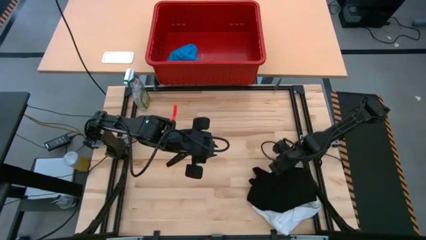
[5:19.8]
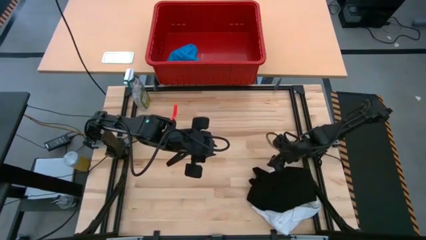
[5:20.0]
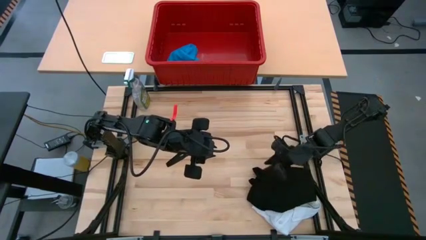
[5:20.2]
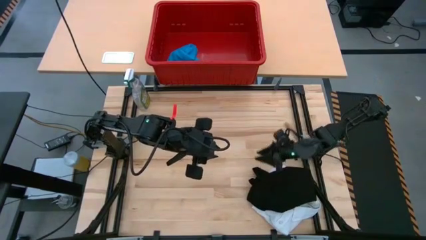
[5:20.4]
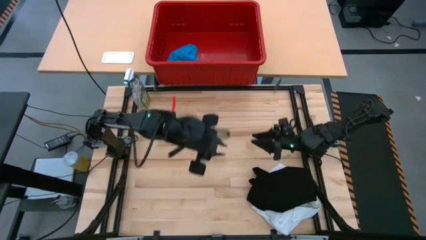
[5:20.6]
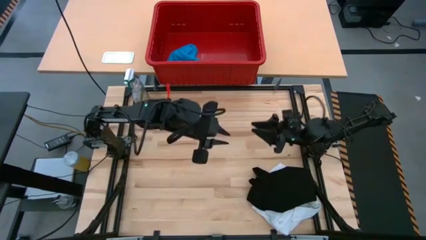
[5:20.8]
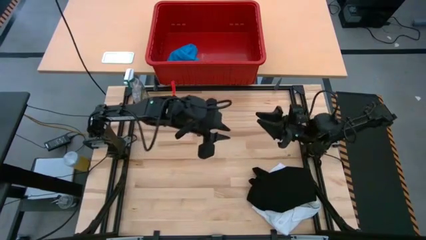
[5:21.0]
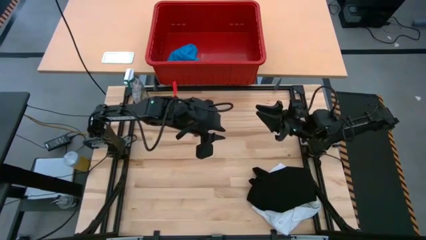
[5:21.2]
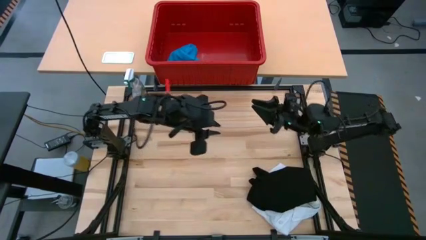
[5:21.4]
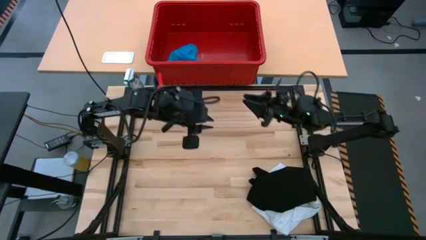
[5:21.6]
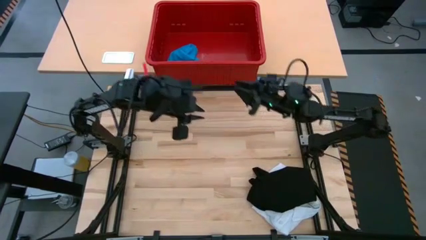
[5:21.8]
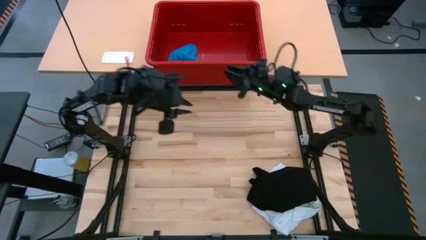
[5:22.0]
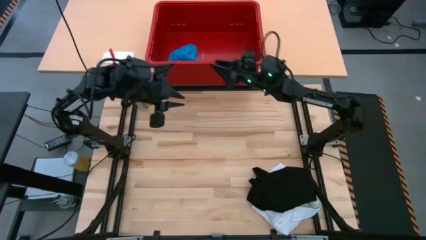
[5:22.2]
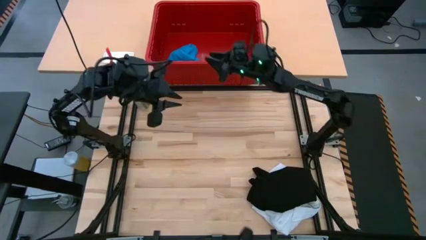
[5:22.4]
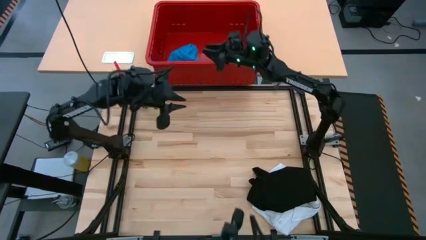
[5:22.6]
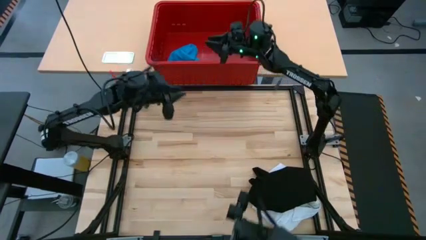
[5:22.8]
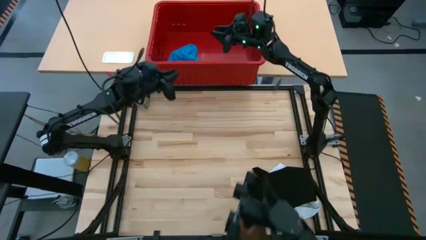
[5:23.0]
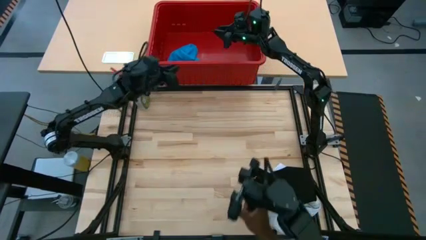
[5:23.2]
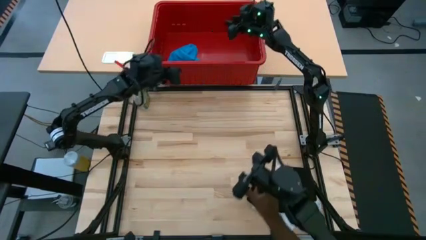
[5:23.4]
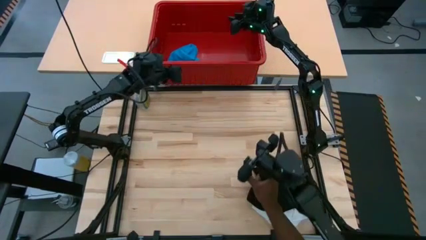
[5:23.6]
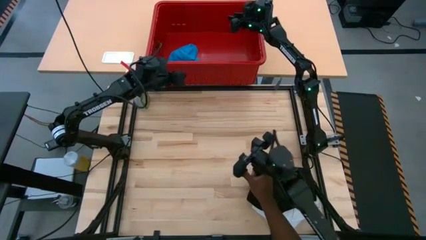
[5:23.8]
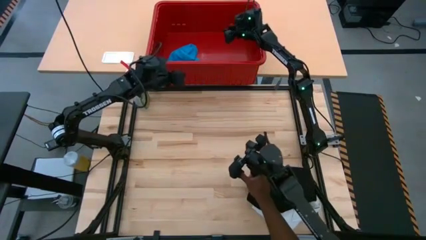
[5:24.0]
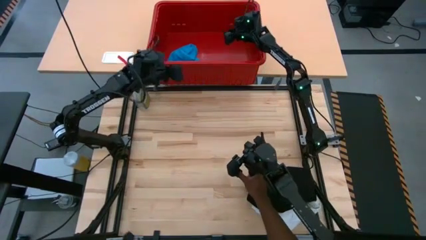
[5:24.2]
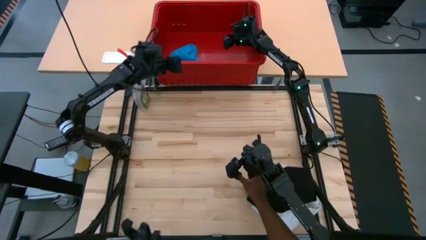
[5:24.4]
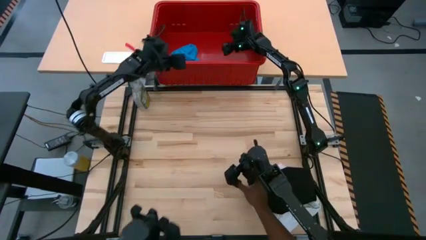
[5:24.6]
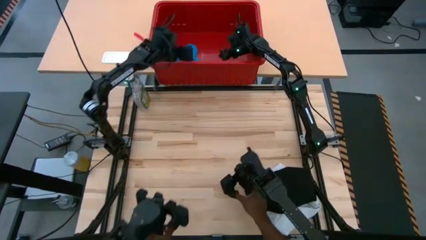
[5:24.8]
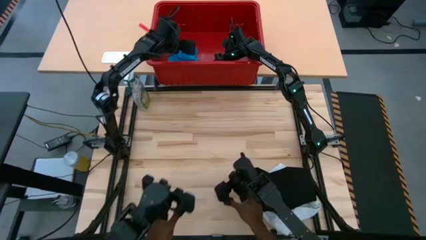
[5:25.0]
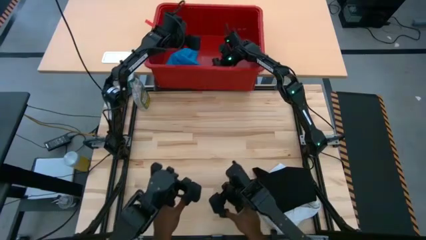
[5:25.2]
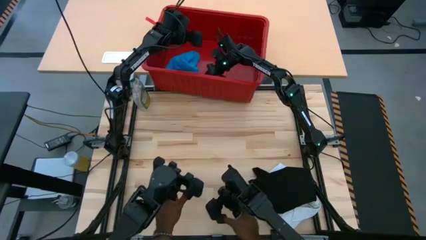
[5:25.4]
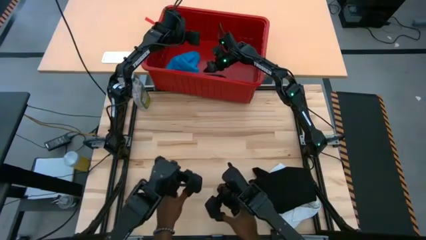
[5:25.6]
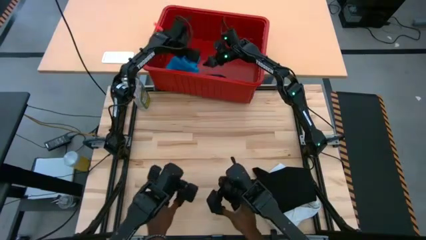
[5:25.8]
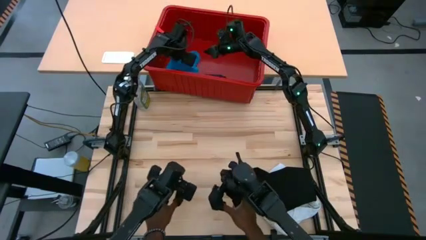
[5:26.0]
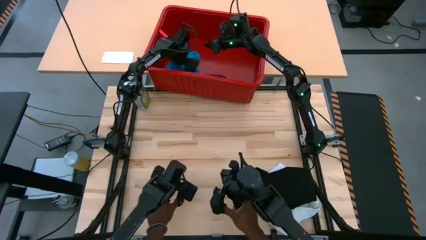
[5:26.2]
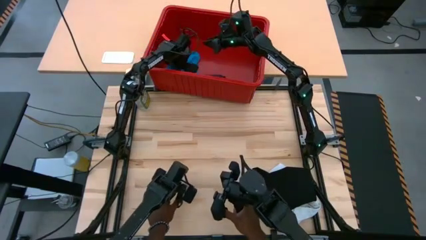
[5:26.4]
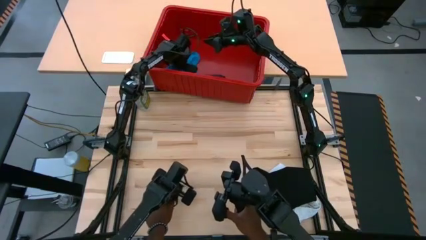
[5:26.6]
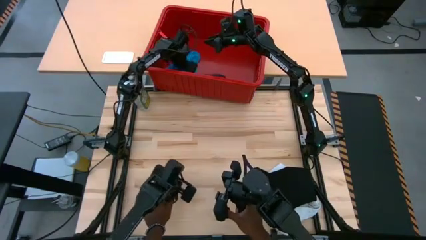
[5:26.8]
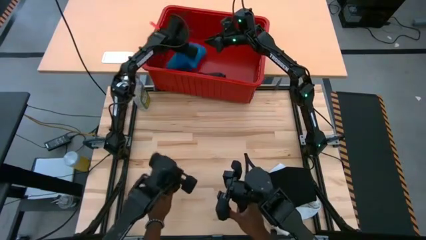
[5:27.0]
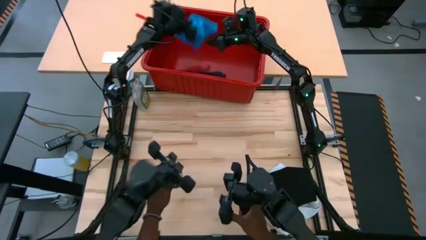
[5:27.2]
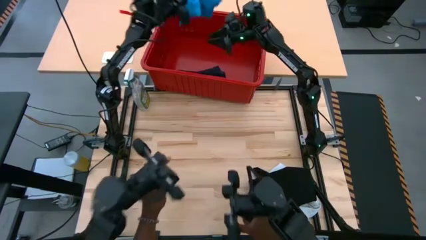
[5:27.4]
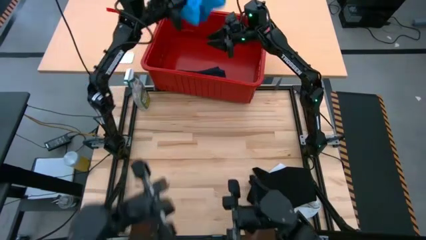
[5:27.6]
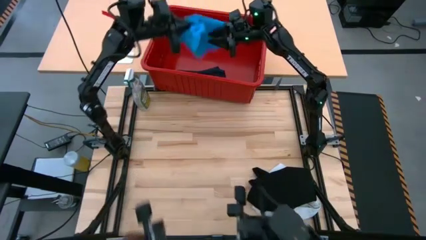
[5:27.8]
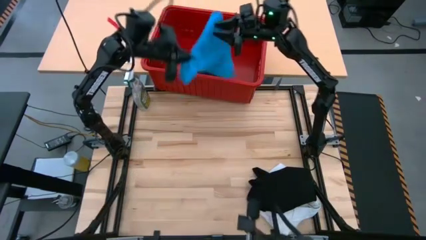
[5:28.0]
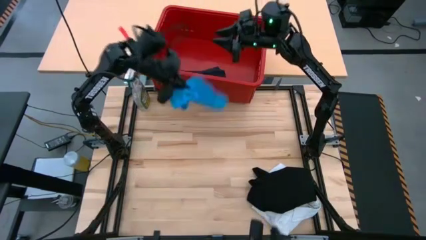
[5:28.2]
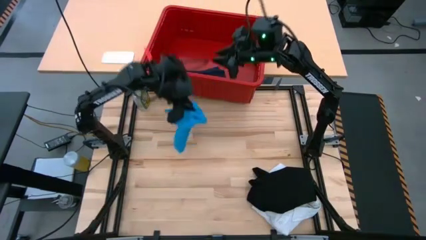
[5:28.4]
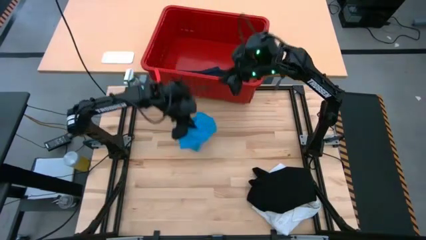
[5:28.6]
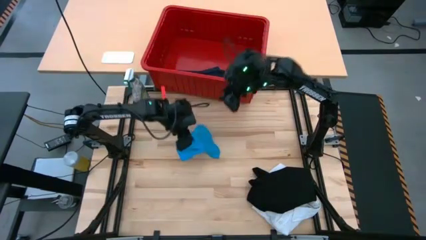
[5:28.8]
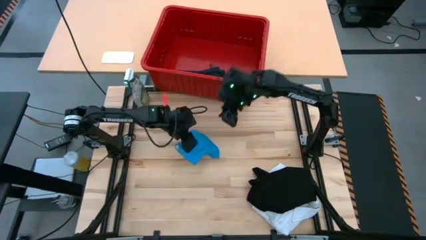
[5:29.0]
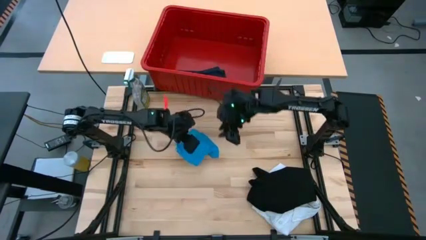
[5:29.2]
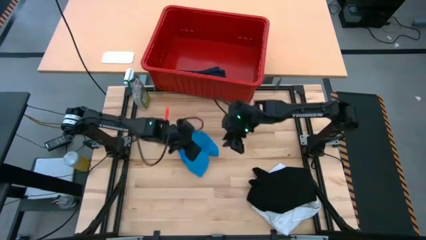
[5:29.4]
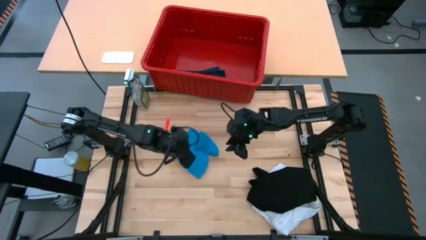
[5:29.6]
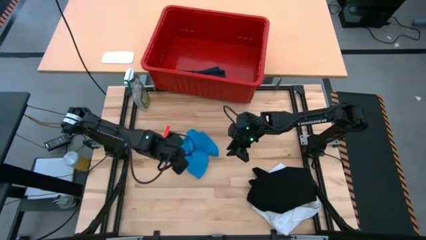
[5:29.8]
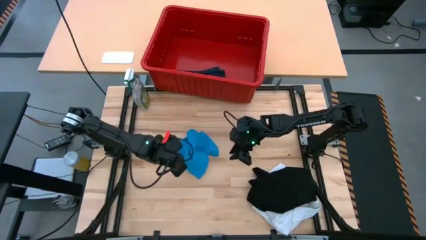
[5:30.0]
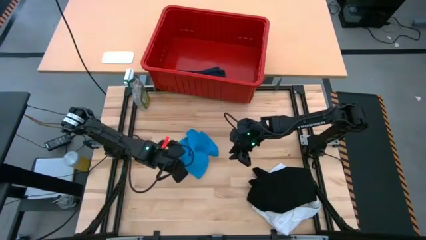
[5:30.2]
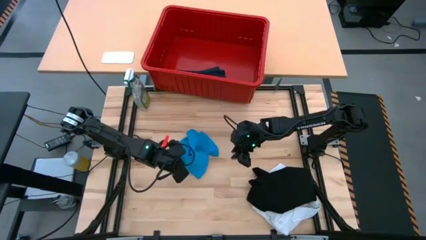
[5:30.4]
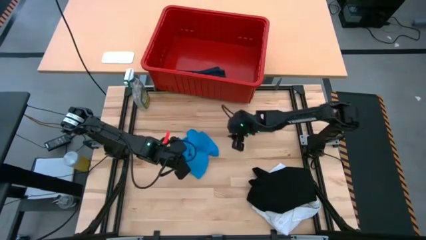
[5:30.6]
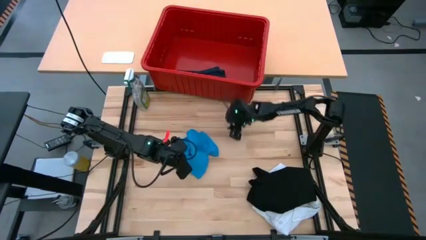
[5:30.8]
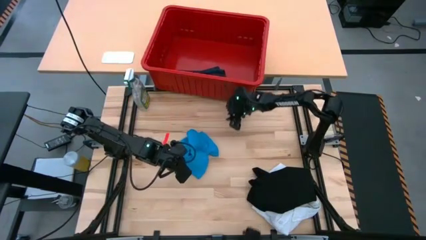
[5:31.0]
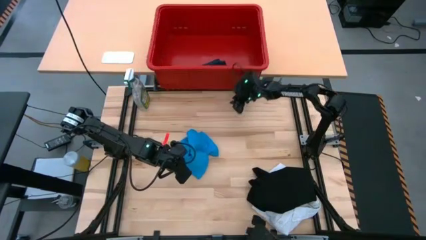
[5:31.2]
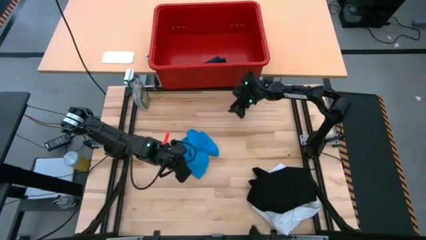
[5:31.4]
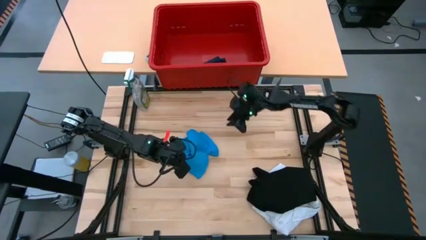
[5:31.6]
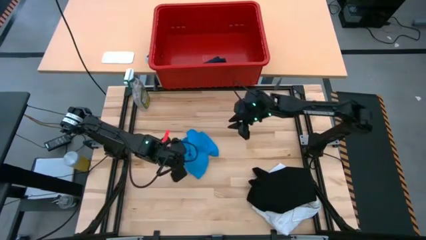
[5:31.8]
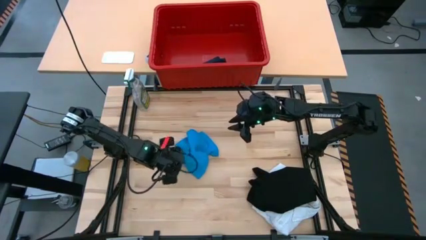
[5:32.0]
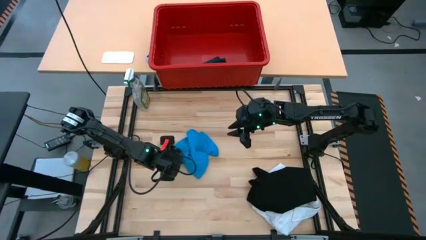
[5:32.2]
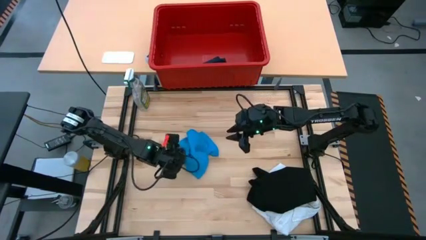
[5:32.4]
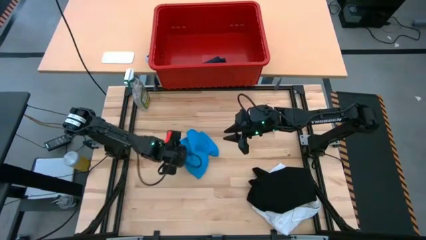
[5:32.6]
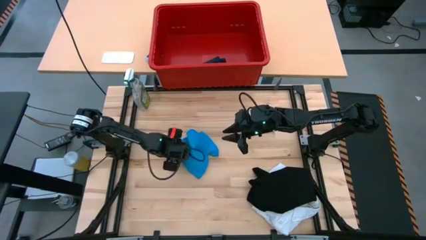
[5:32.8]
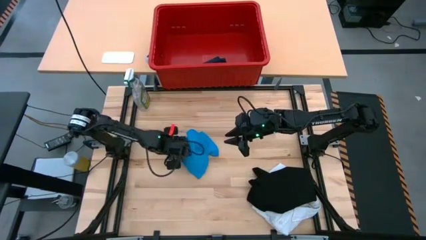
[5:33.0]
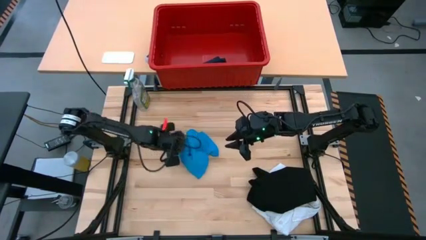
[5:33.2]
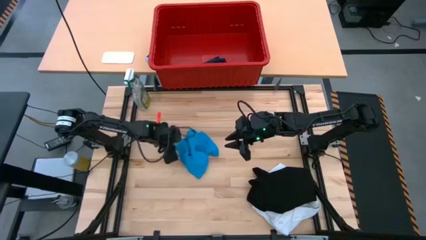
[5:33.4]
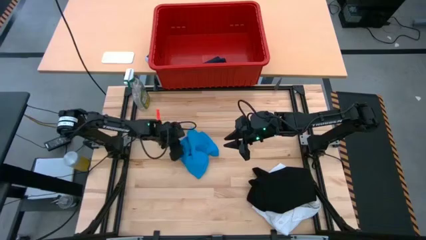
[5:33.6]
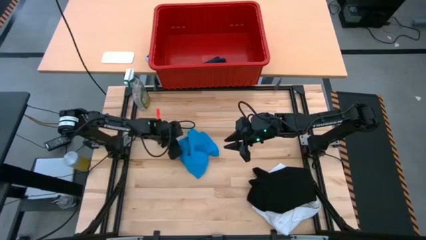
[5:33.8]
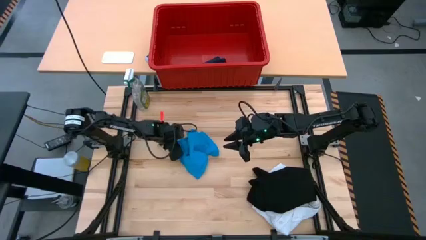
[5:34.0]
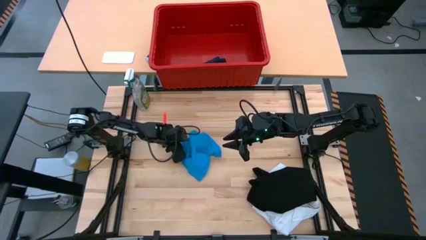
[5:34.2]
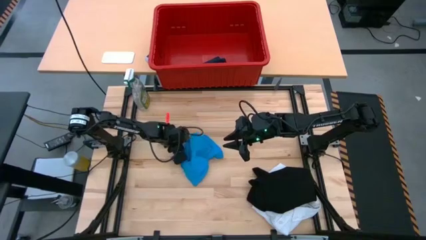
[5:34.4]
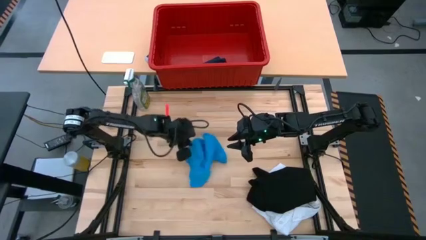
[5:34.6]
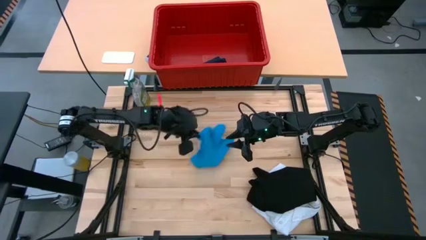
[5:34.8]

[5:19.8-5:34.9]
Task: Fold laundry
Fold the blue shorts

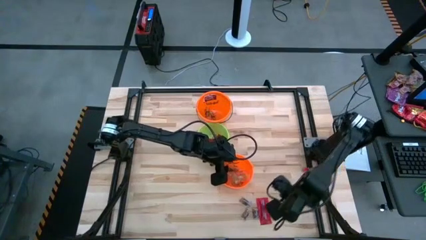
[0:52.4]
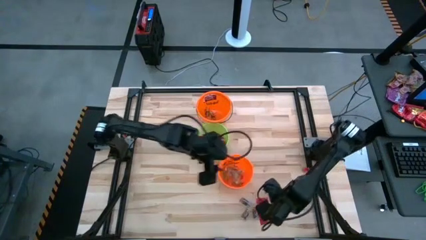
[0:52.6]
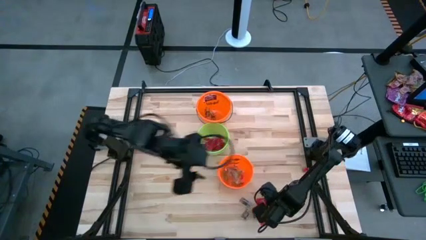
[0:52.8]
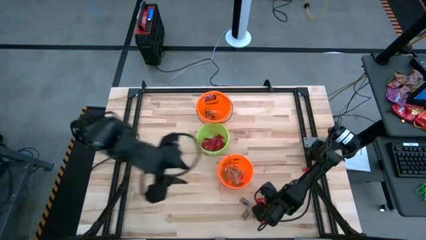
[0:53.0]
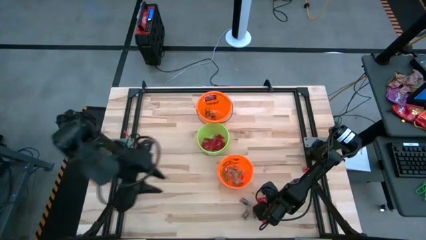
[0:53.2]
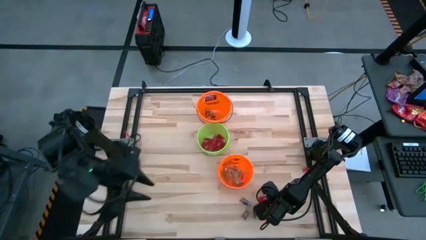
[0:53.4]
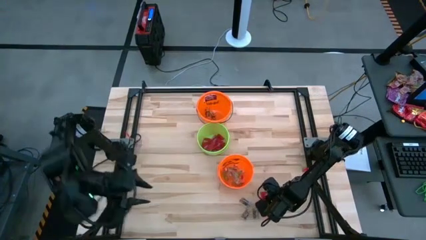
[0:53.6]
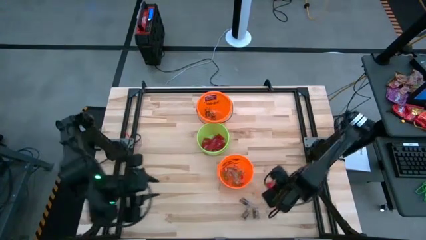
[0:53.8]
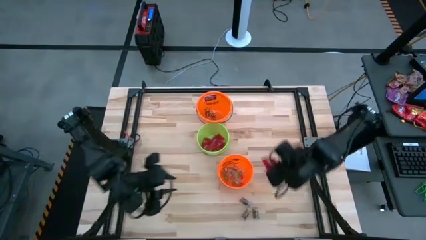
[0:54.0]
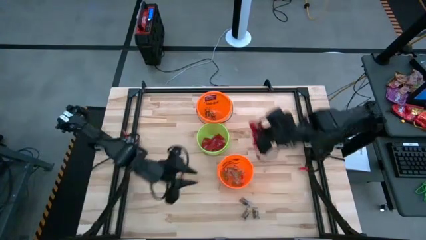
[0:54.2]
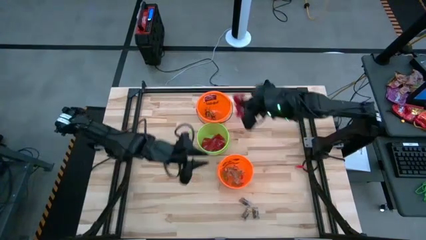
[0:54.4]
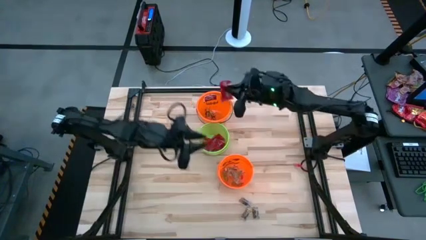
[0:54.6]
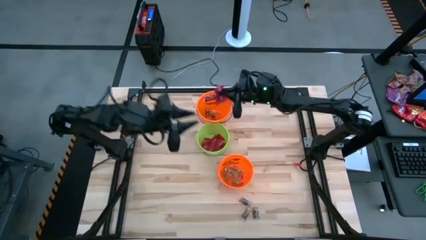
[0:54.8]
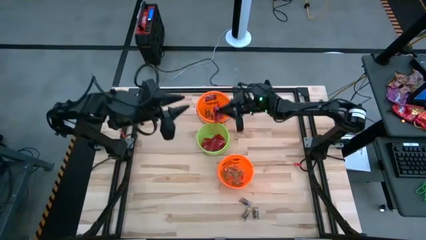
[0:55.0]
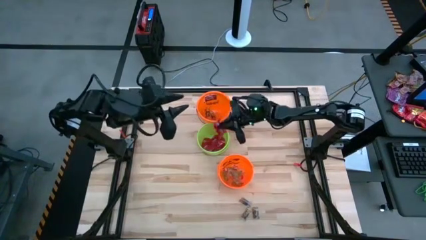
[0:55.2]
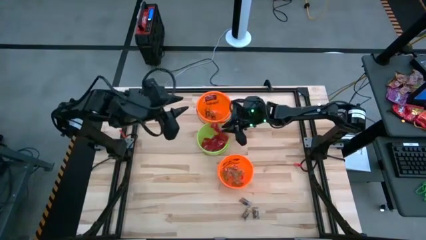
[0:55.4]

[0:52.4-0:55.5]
Task: Sort candy by brand, put in halloween buckets
Put the red candy into the green bucket
